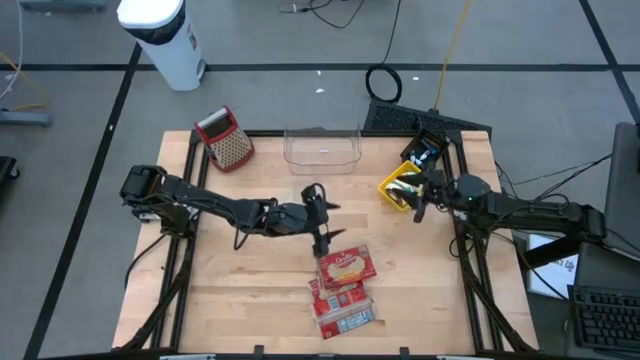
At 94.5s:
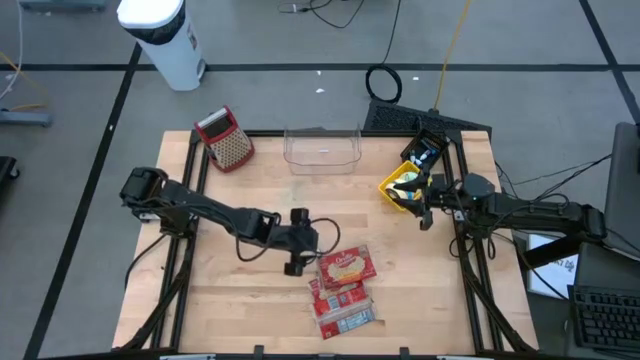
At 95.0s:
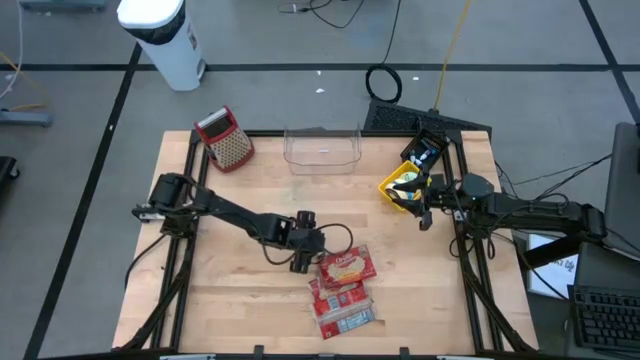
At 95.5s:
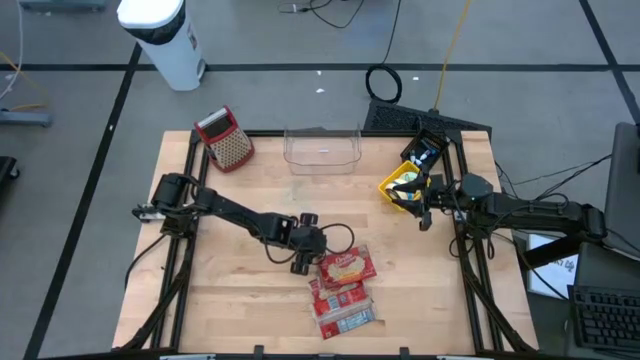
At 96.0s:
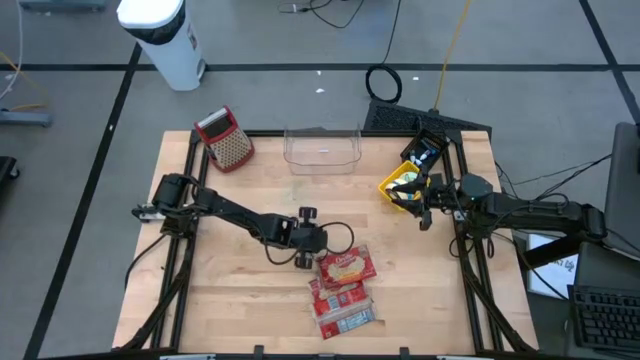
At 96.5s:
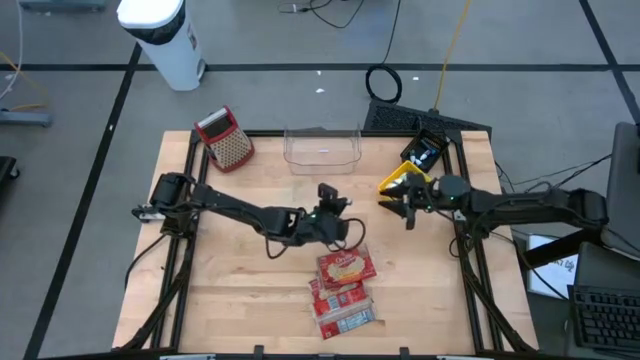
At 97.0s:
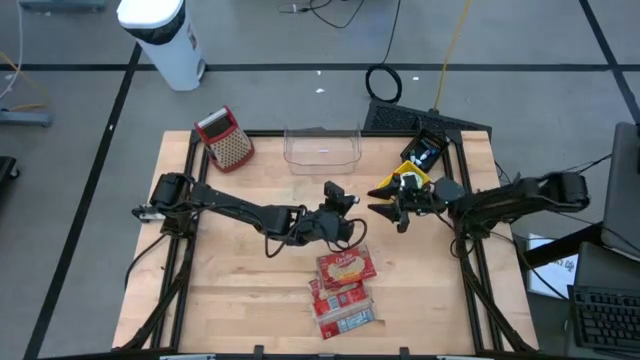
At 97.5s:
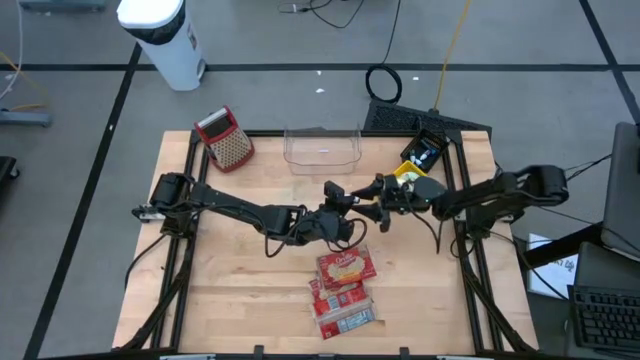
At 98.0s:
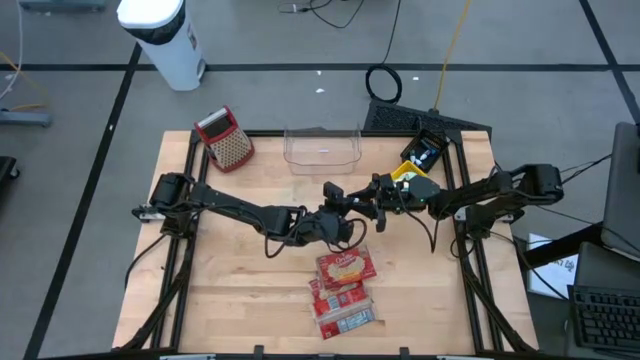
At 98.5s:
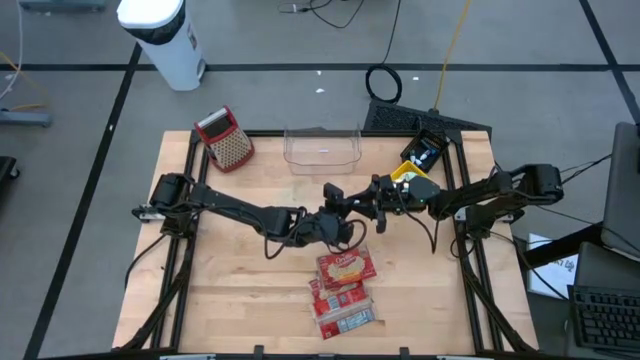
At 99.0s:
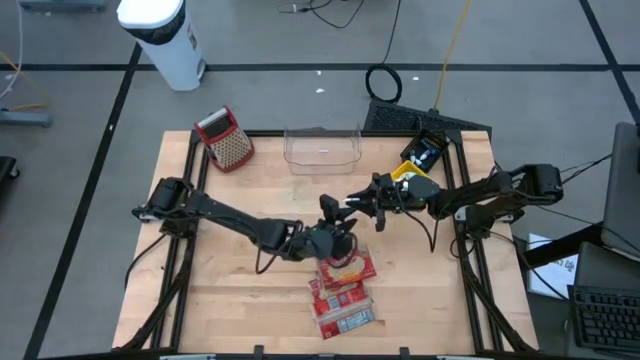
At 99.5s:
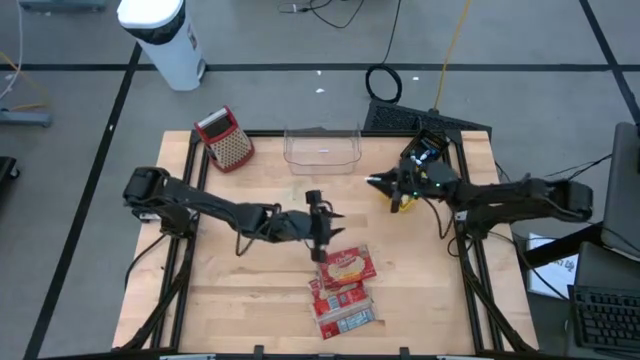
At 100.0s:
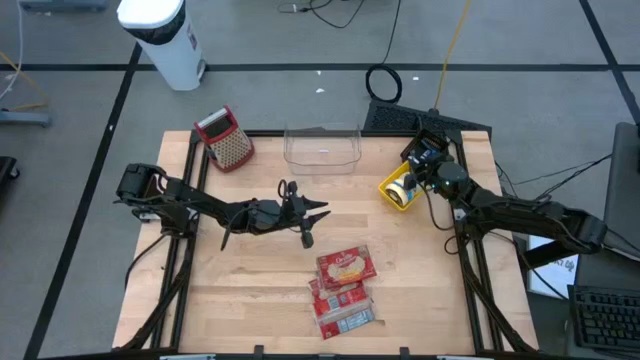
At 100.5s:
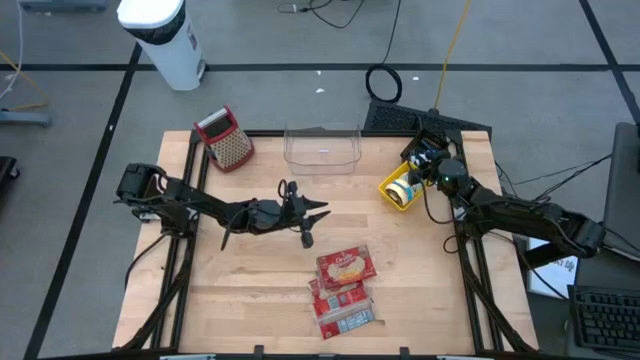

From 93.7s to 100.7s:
Put the green food coloring bottle into the black bin

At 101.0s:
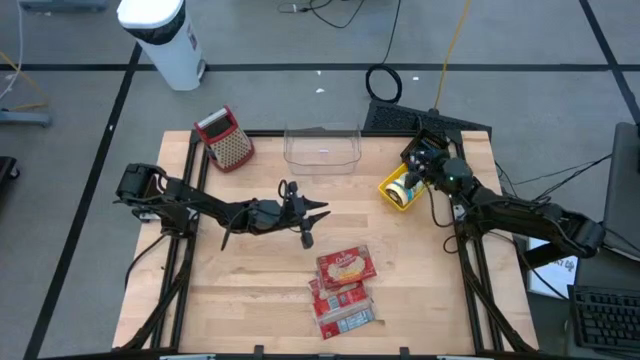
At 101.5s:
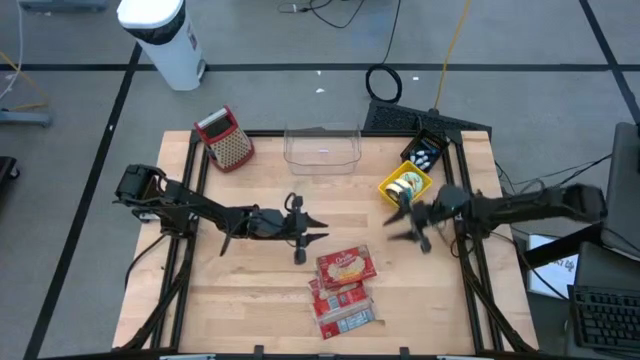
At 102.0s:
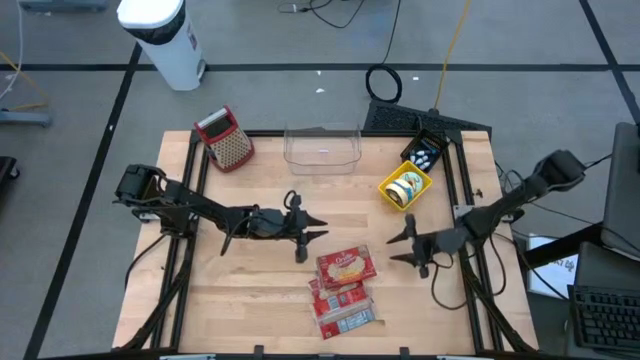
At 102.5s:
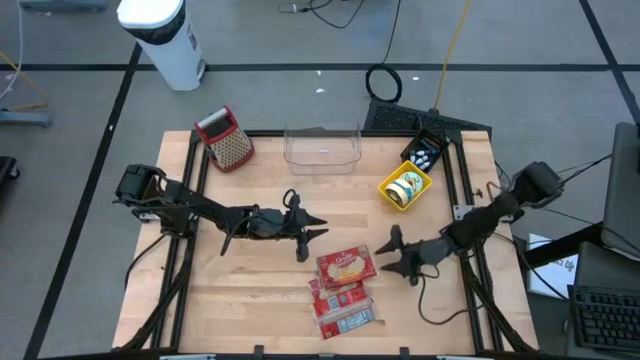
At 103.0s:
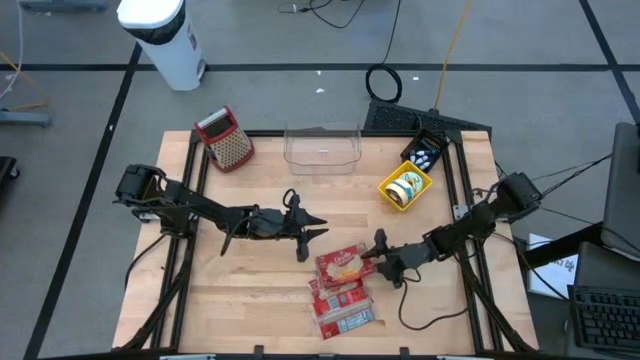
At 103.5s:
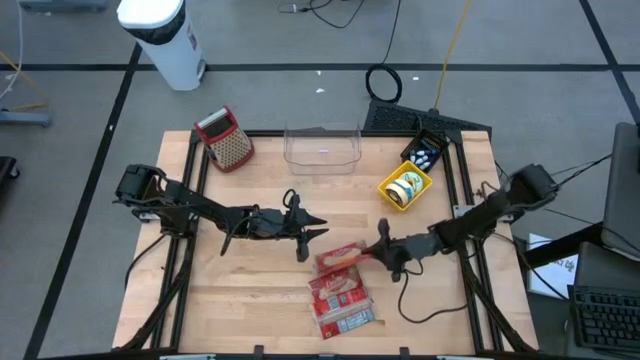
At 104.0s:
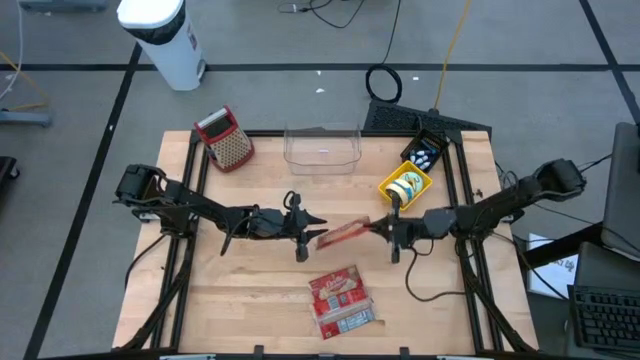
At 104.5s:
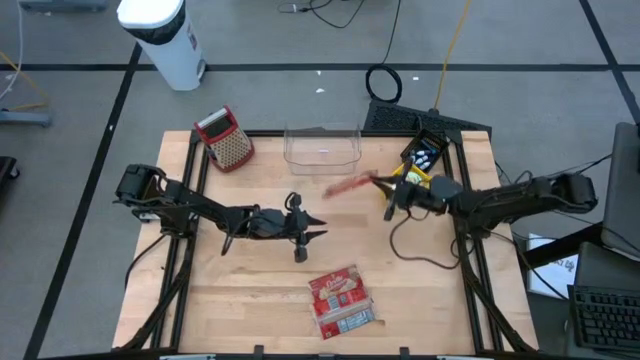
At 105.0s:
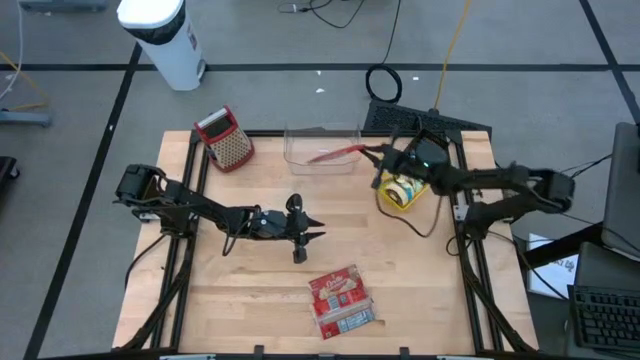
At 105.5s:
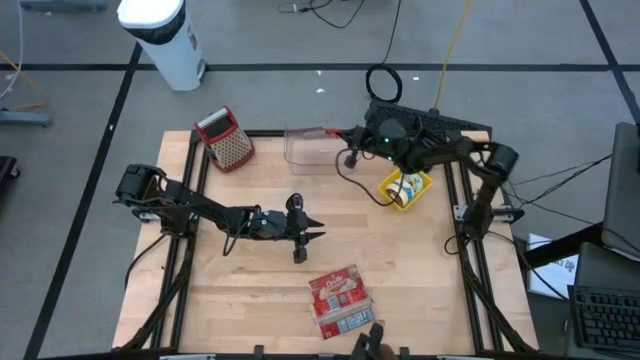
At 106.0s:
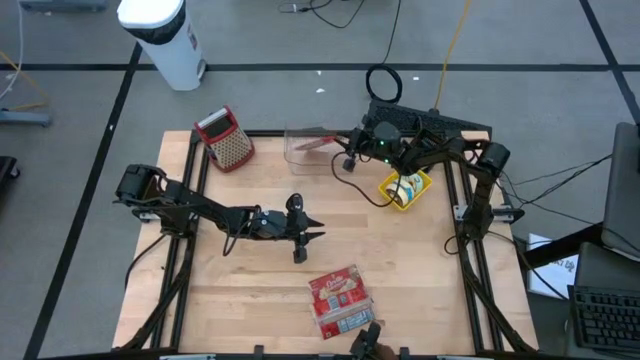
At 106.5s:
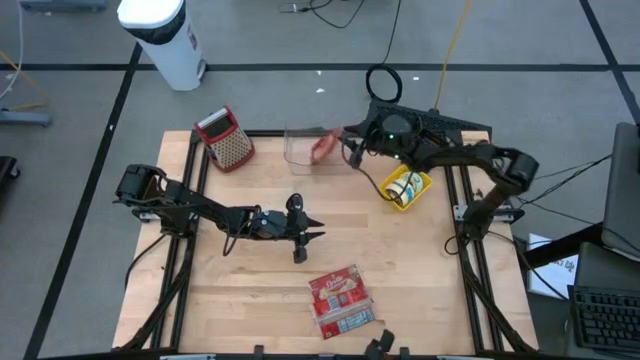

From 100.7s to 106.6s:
Put the top red popcorn bag into the transparent bin

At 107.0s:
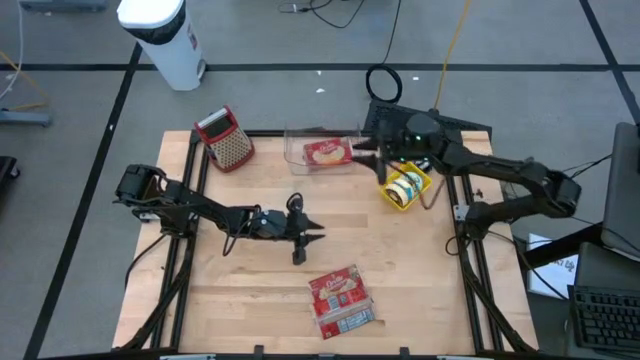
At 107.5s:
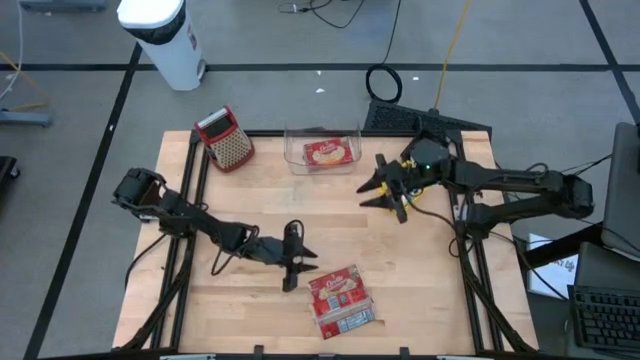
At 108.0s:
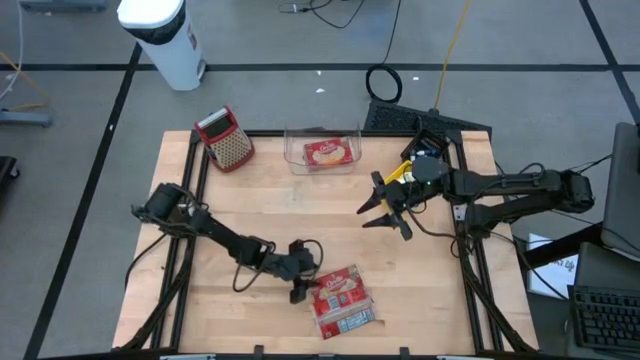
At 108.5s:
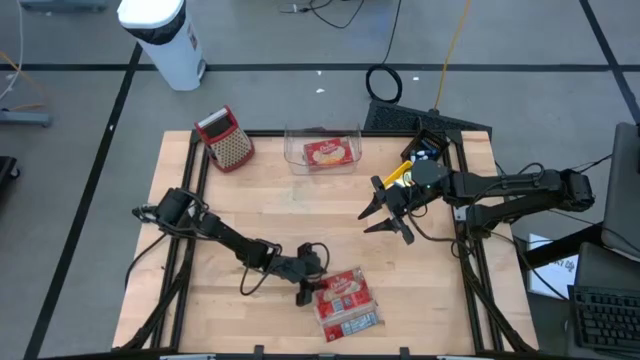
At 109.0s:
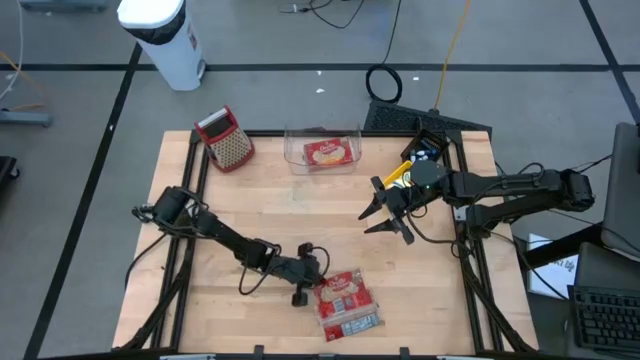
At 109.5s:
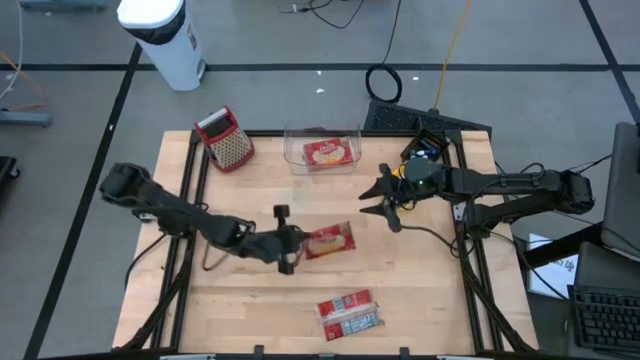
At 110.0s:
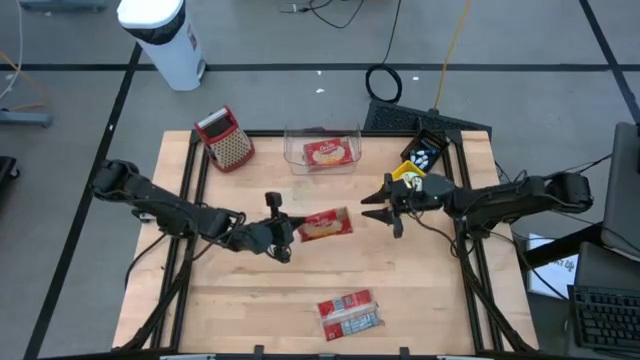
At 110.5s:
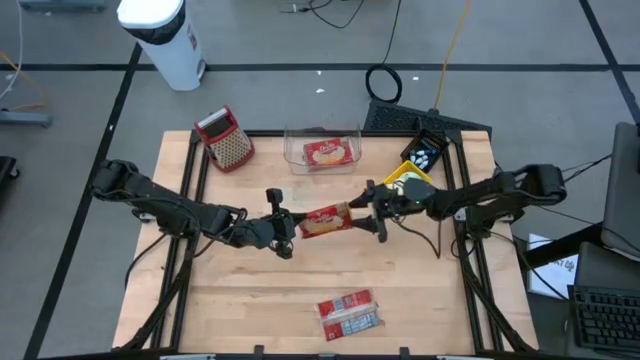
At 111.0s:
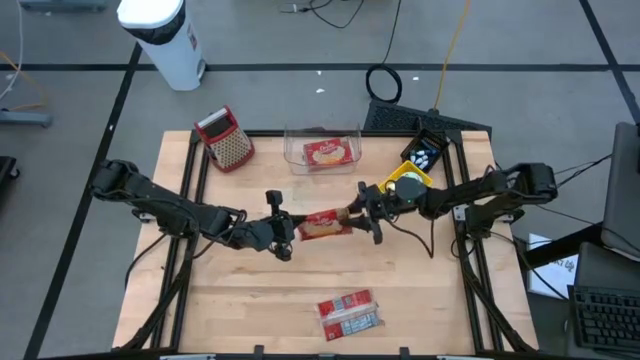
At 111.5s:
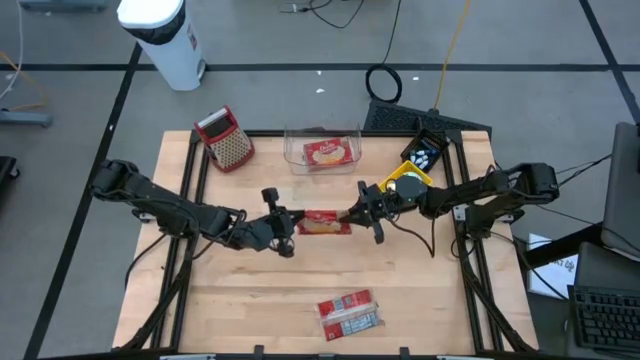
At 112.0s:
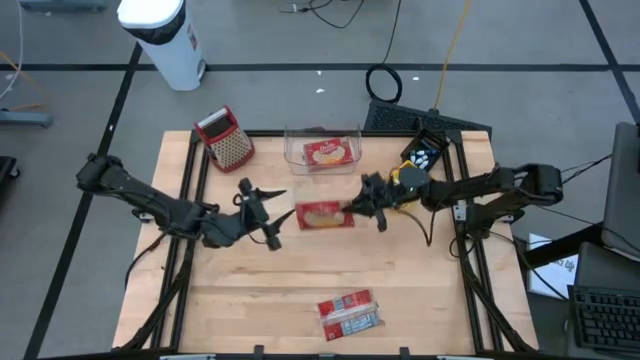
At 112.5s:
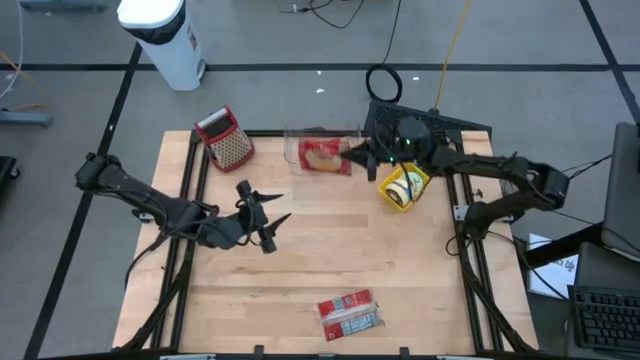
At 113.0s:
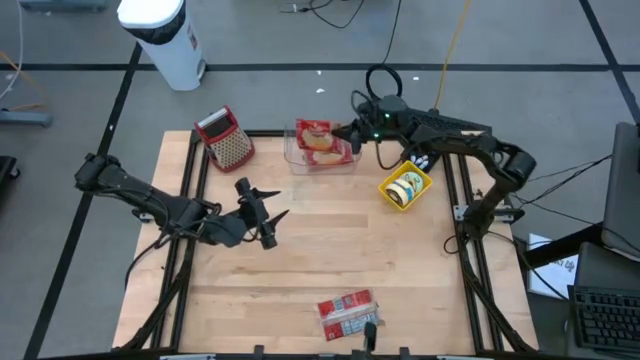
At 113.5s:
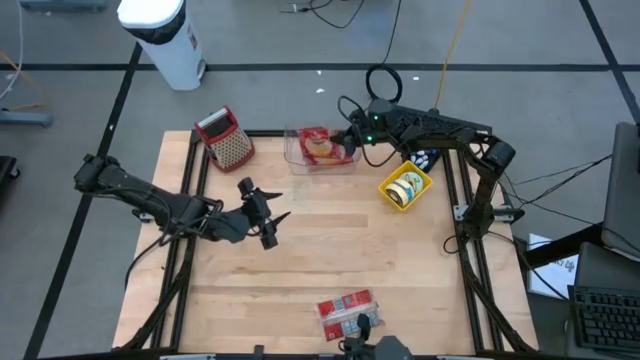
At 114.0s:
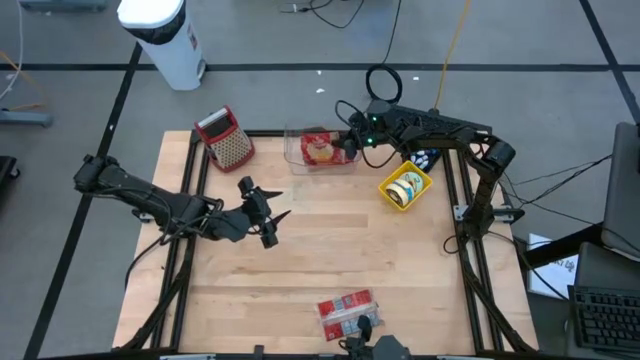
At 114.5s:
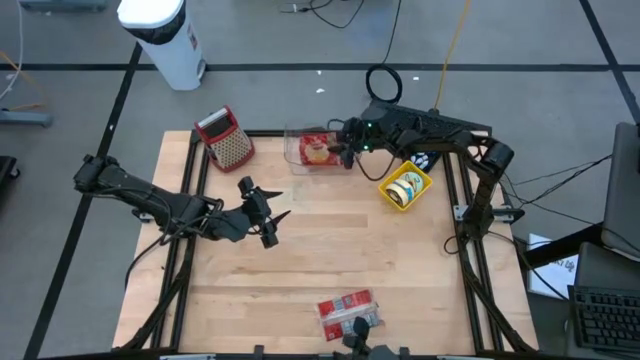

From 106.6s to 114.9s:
Put the top red popcorn bag into the transparent bin
